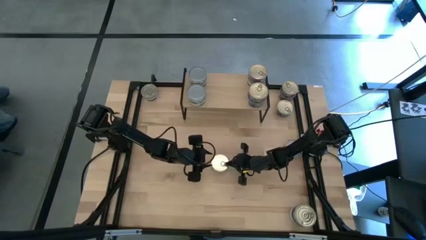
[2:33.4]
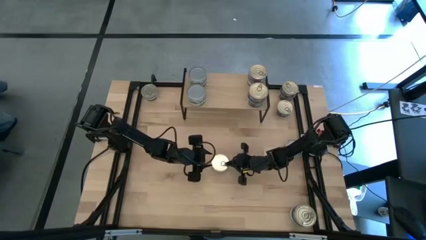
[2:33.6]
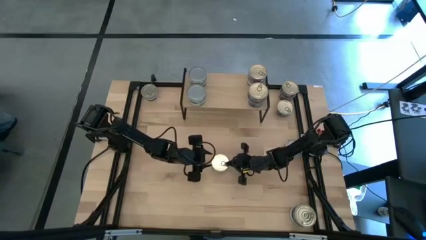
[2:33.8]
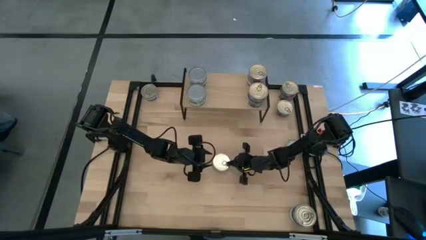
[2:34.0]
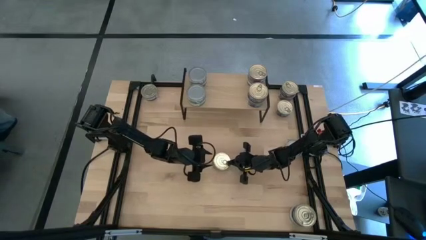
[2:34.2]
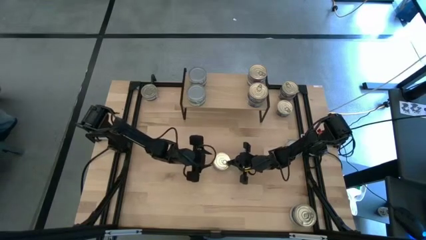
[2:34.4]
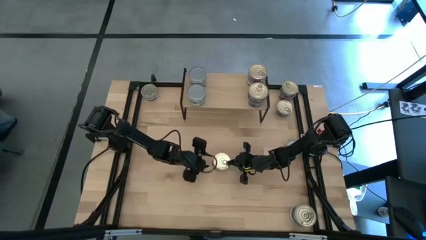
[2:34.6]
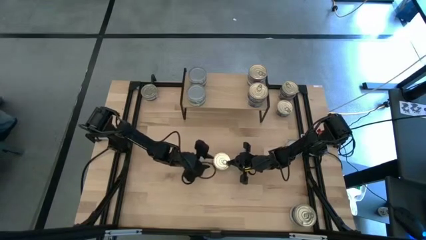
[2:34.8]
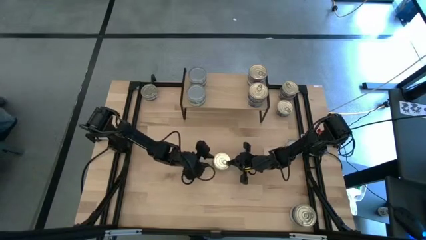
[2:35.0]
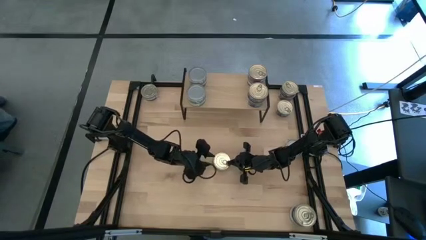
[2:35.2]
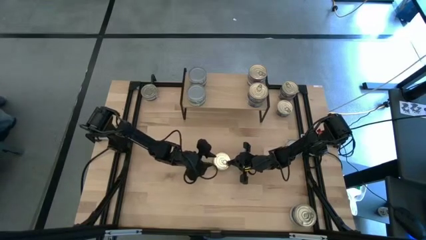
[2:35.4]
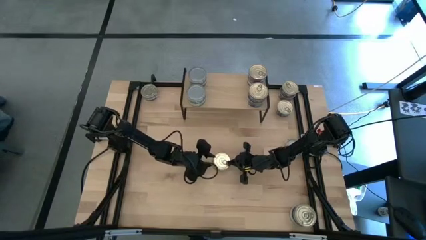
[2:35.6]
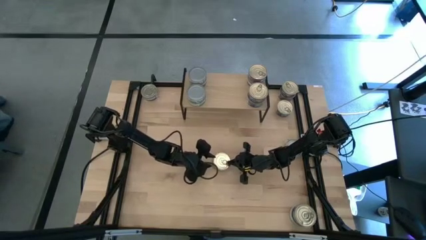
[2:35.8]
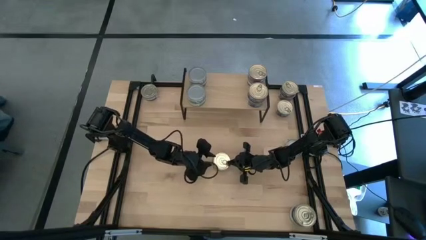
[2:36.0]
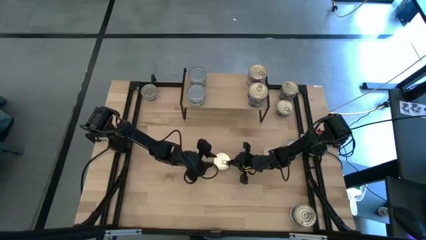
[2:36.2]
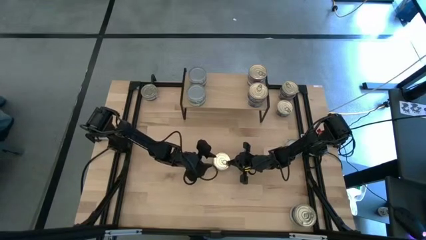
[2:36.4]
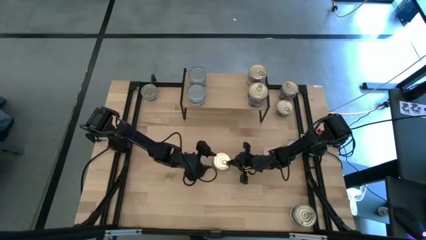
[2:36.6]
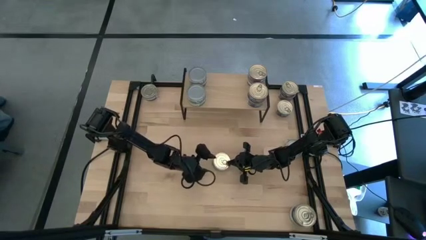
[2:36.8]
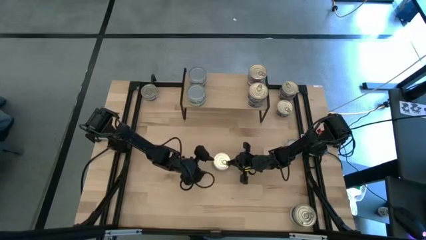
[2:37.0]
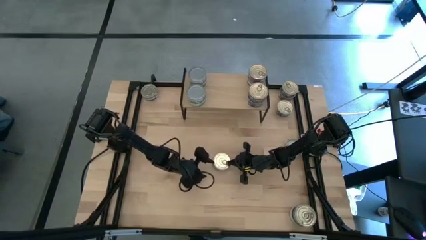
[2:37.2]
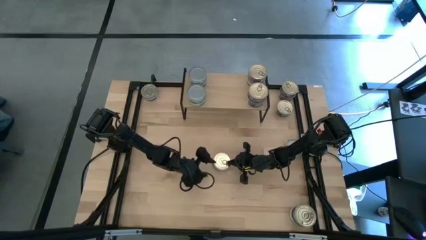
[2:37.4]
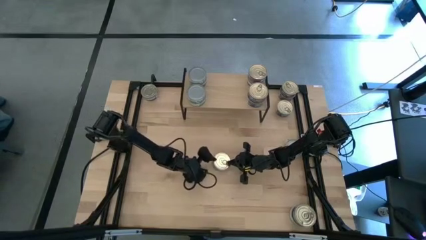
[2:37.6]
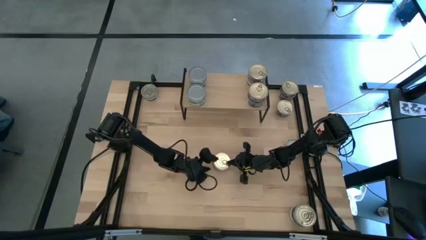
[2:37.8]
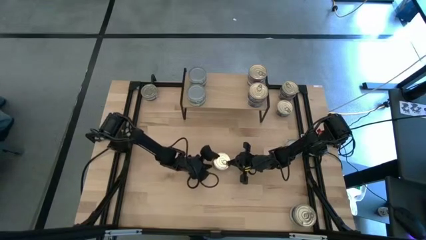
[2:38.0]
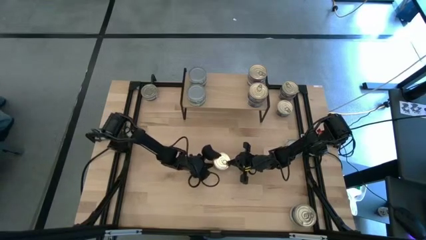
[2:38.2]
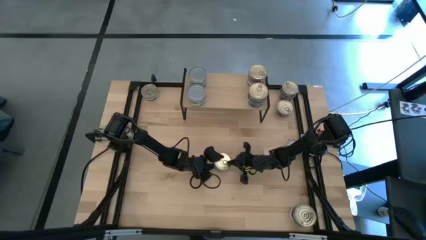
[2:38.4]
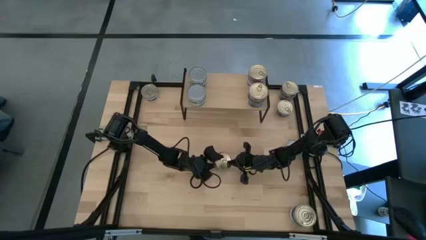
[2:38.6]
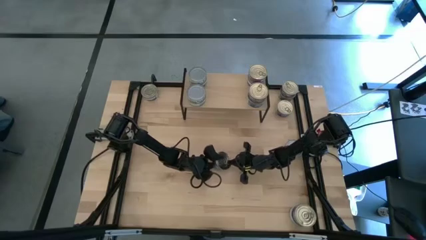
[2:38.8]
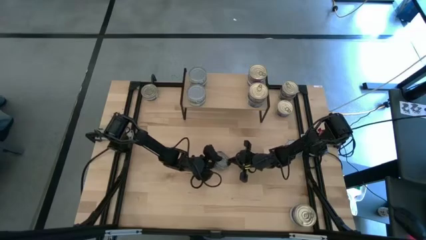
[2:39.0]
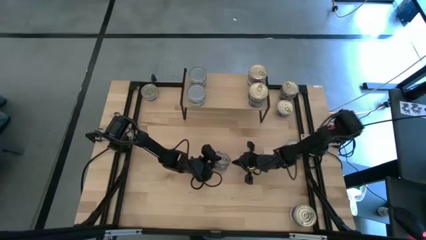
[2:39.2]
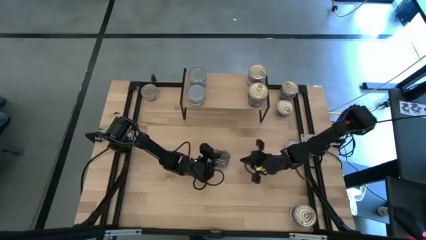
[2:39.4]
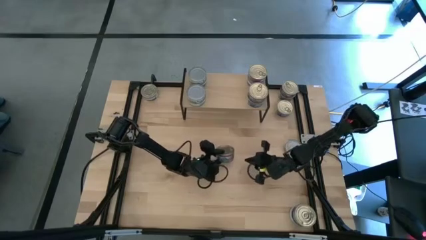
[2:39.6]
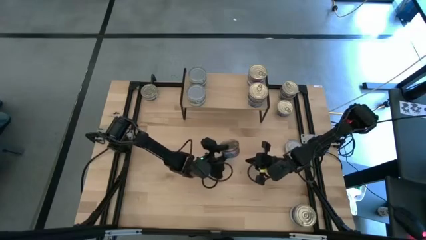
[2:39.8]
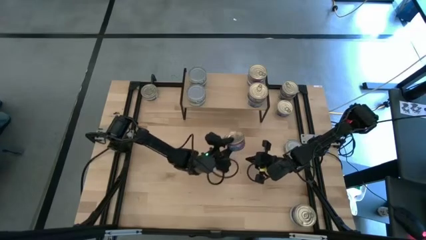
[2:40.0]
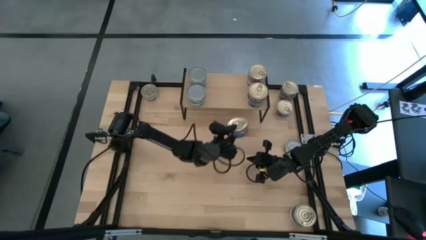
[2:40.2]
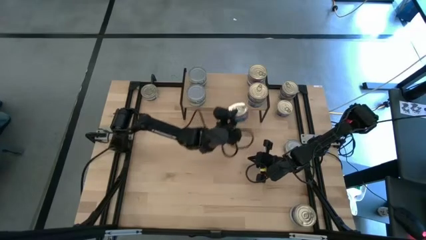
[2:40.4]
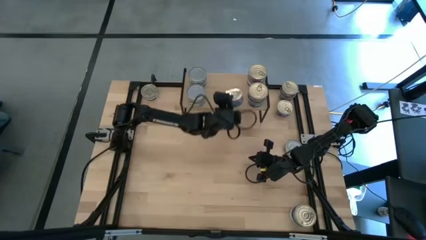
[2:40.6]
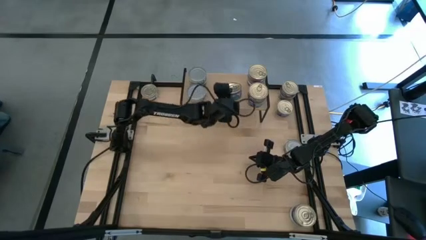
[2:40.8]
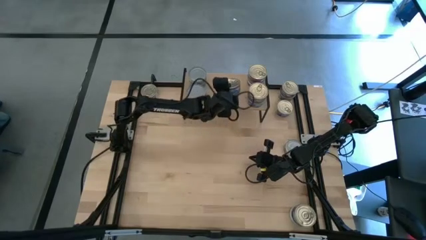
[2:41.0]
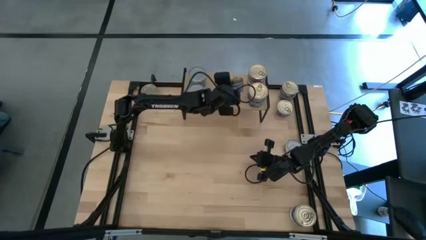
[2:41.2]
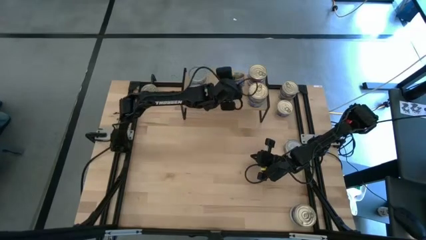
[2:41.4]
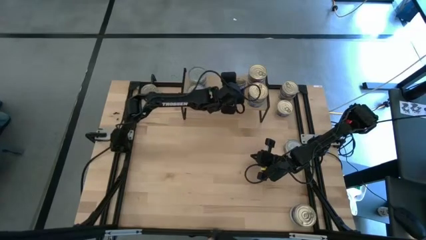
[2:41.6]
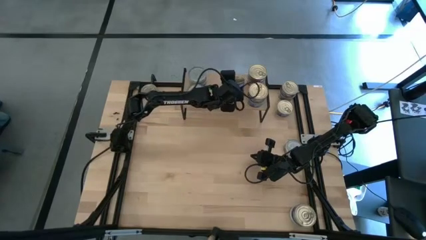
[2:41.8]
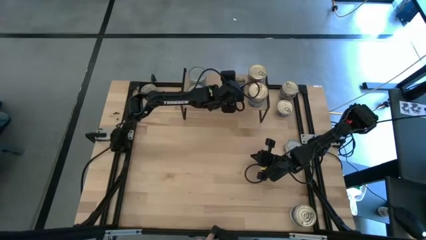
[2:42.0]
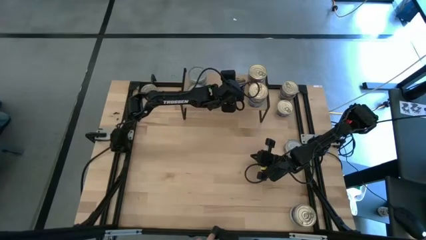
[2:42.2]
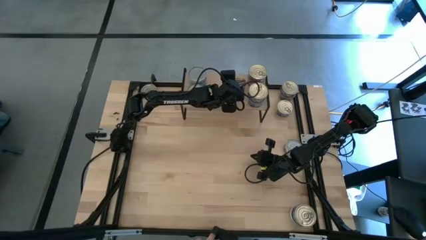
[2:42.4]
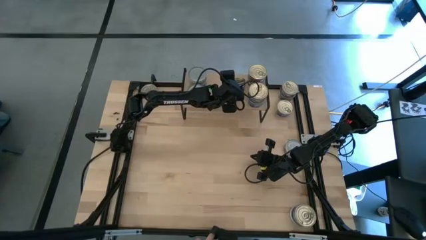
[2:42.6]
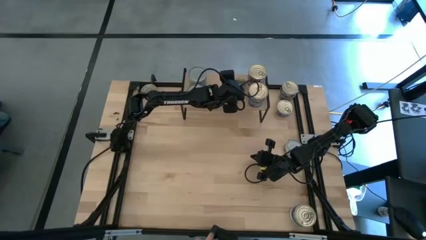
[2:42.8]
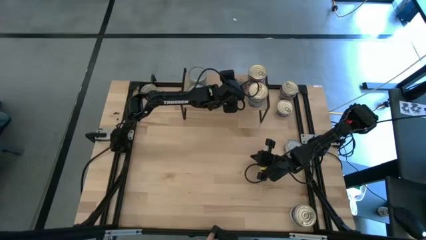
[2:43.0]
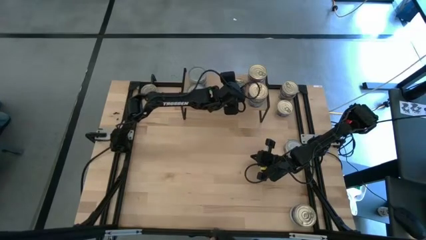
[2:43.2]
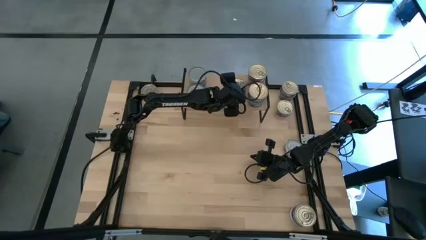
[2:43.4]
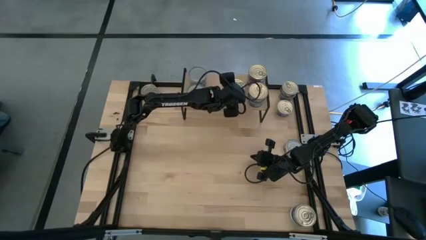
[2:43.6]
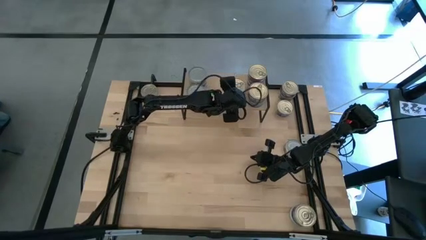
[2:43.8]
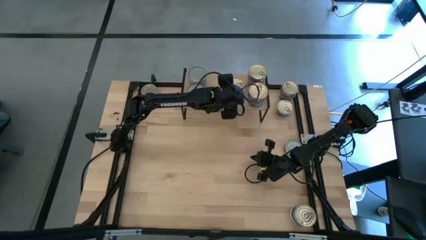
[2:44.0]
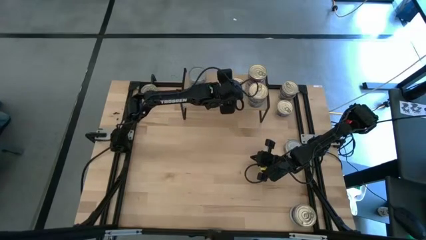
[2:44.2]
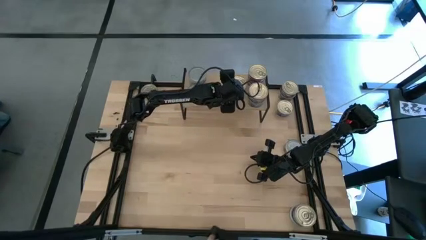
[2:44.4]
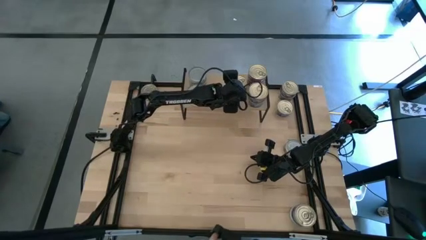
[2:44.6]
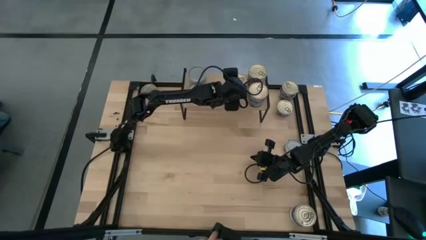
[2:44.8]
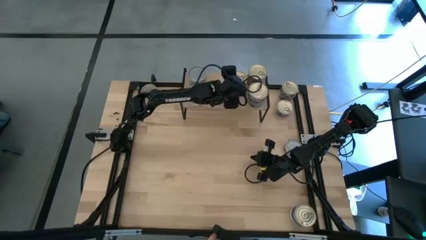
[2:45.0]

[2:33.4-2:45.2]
Task: Stack canned seafood by type on shelf
Put the blue pink tuna can on the shelf aligned with the other blue pink tuna can

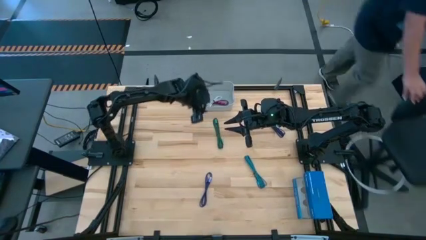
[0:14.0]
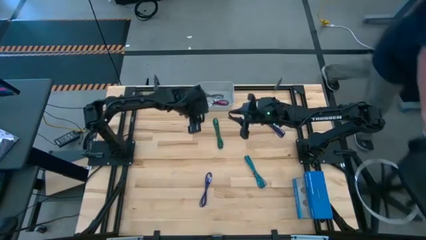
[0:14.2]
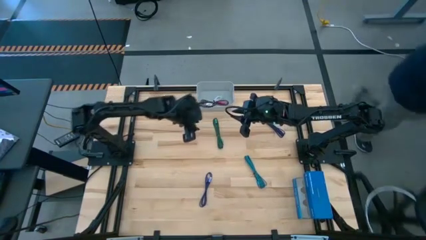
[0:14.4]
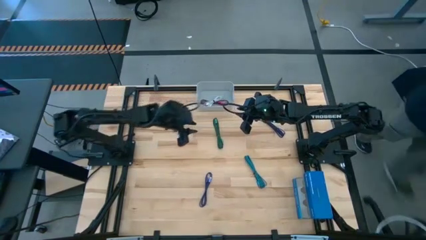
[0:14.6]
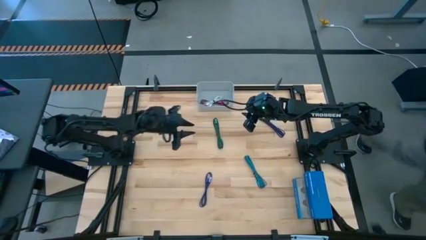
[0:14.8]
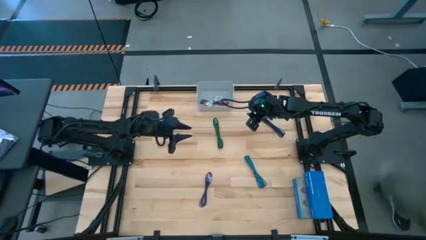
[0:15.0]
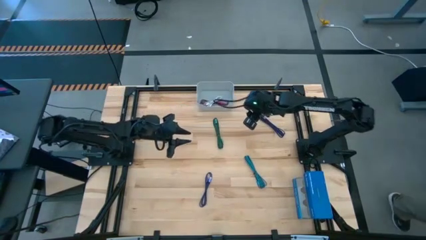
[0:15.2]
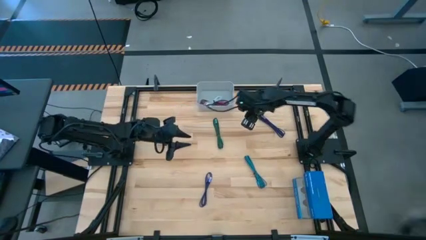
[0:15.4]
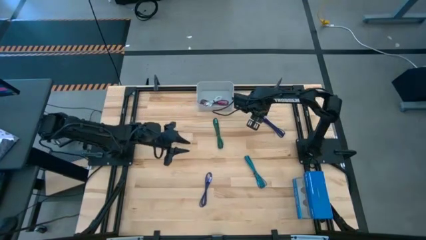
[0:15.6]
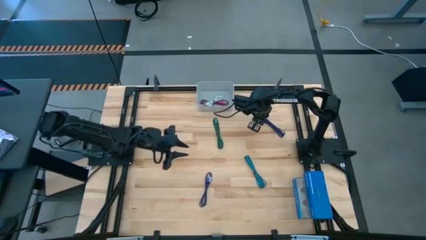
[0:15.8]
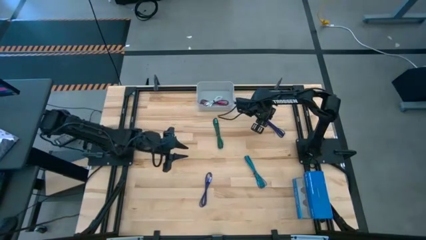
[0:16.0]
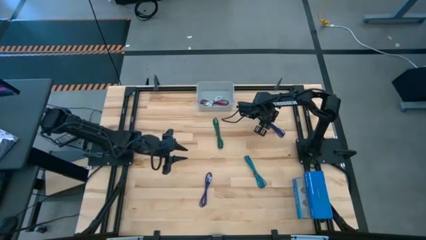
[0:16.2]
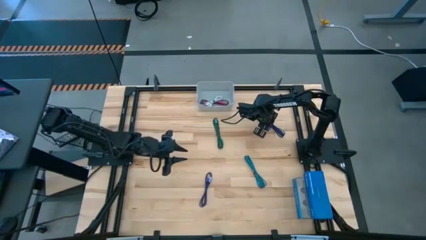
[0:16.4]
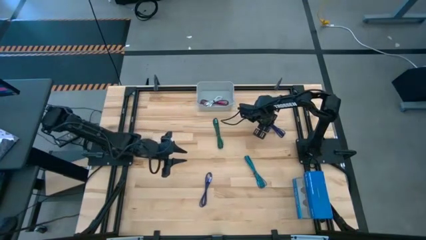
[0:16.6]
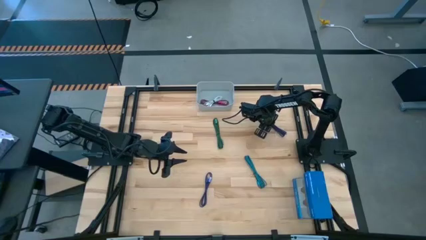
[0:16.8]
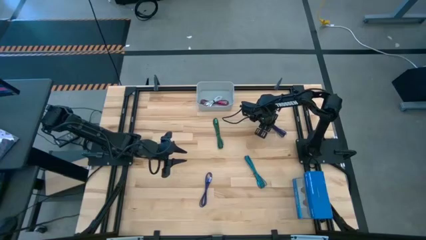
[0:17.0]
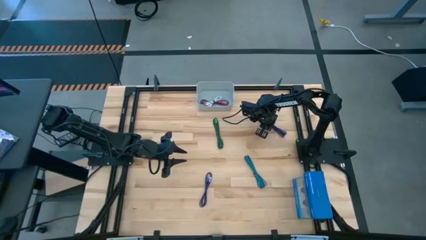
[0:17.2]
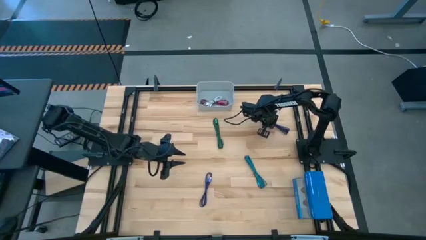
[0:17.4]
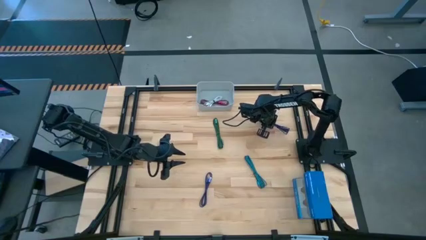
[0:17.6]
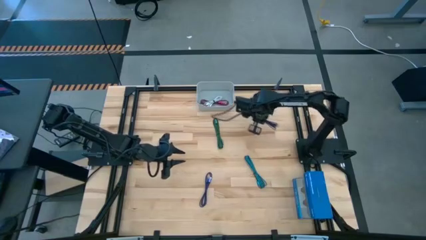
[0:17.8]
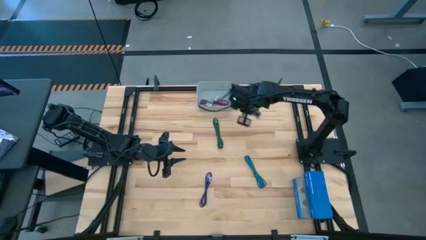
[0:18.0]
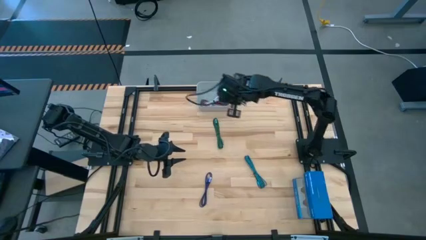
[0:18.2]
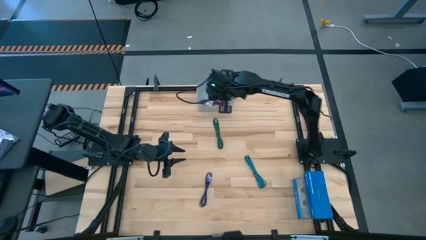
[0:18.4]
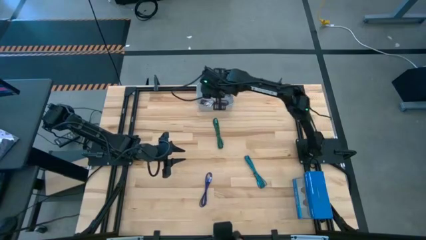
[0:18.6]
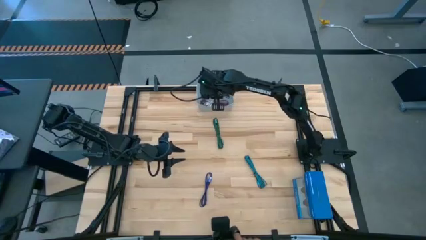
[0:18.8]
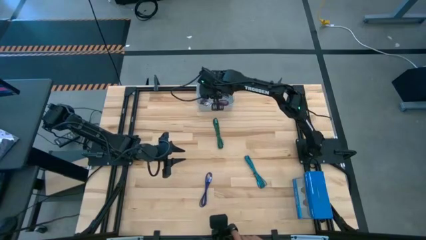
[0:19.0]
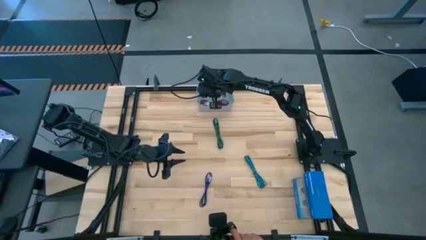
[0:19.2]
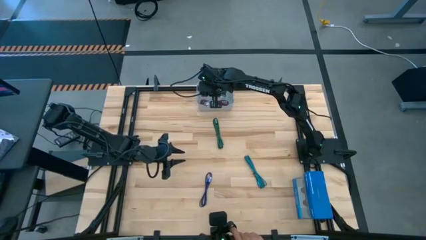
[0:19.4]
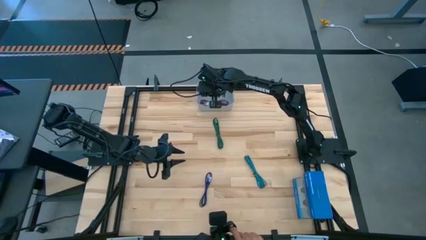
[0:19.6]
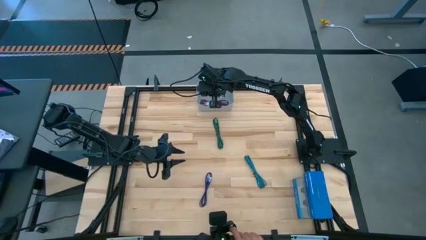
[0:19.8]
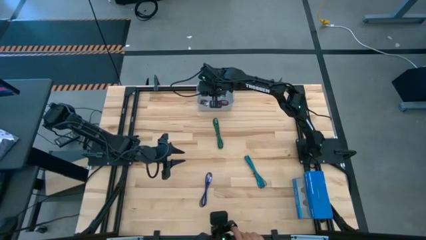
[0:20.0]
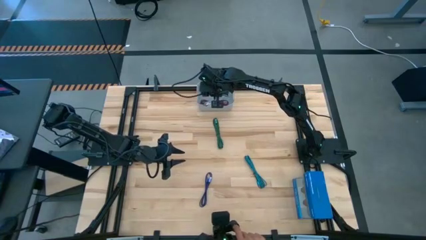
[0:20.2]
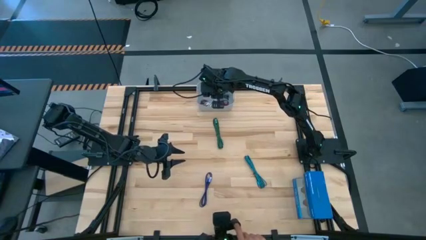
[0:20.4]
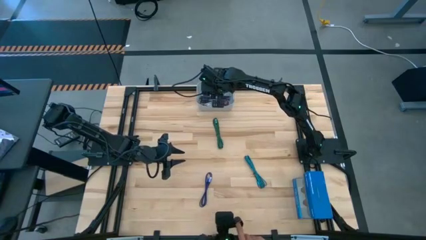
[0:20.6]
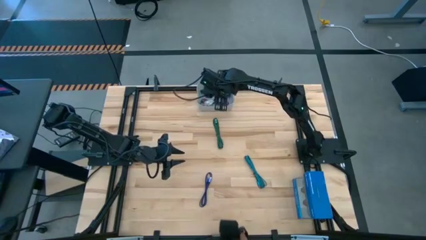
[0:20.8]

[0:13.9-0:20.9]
Task: Pick and place USB-C Cables
Put the top dark blue charger cable into the gray bin
